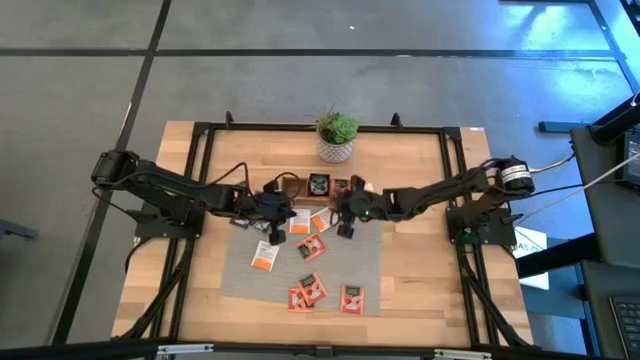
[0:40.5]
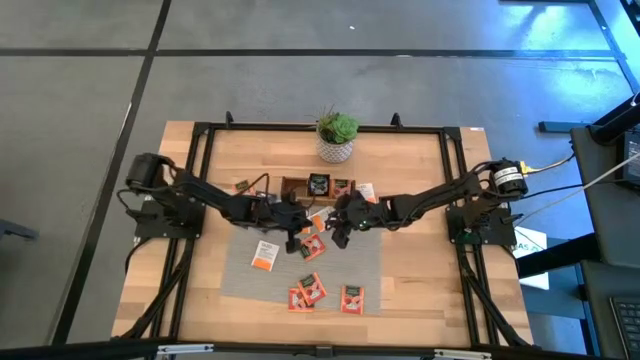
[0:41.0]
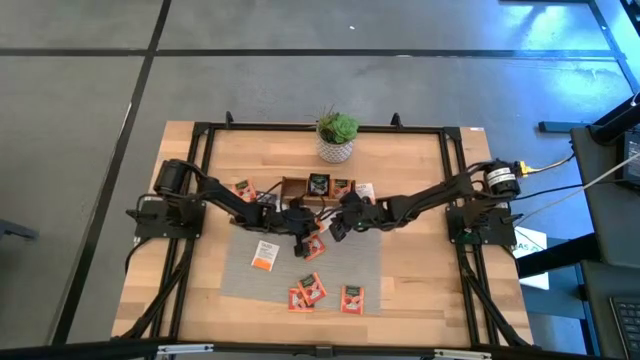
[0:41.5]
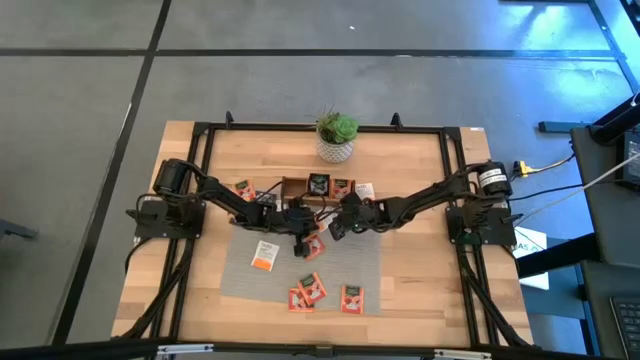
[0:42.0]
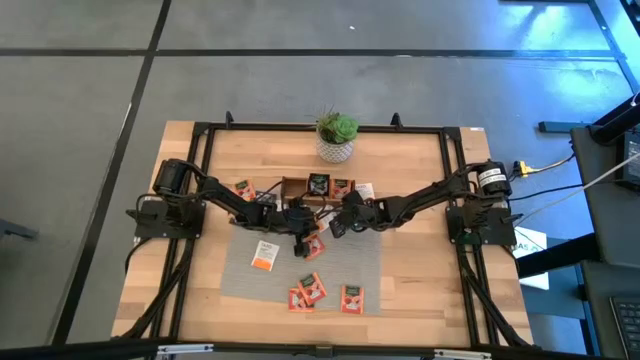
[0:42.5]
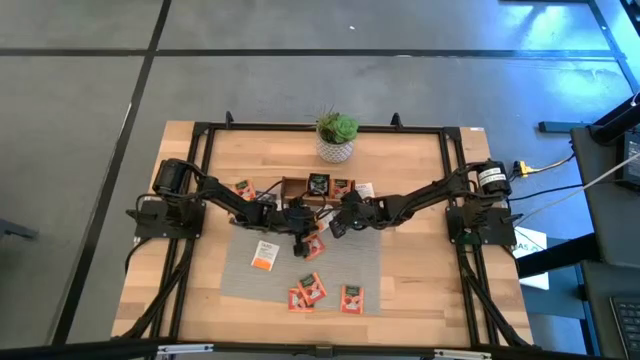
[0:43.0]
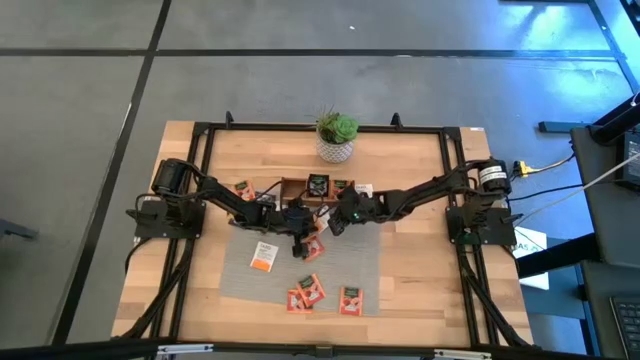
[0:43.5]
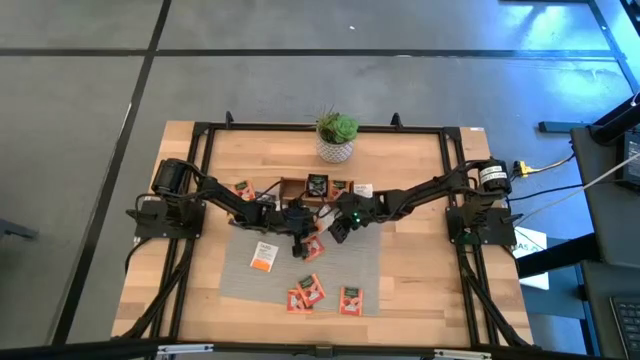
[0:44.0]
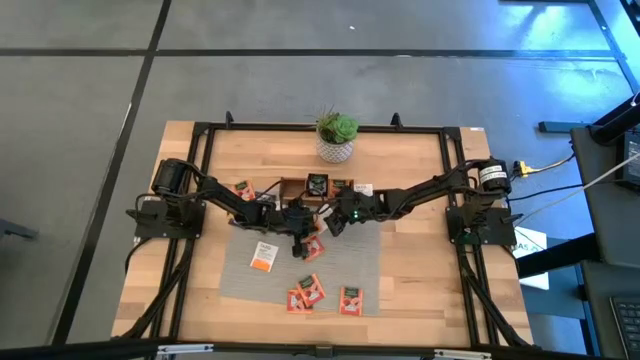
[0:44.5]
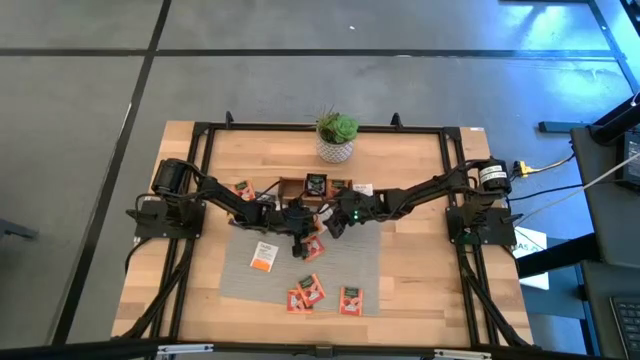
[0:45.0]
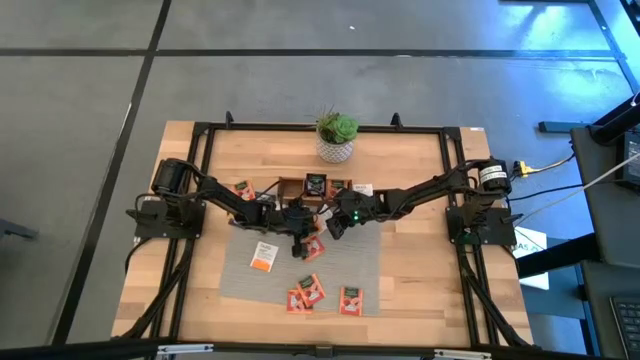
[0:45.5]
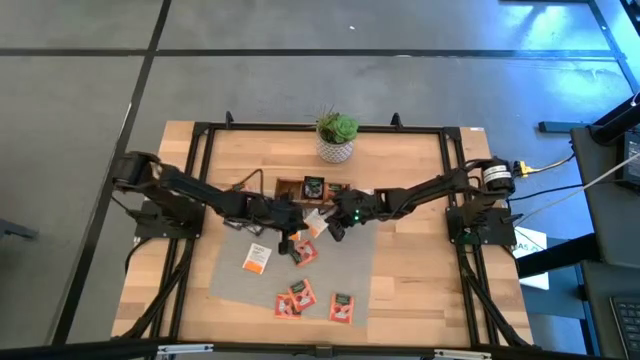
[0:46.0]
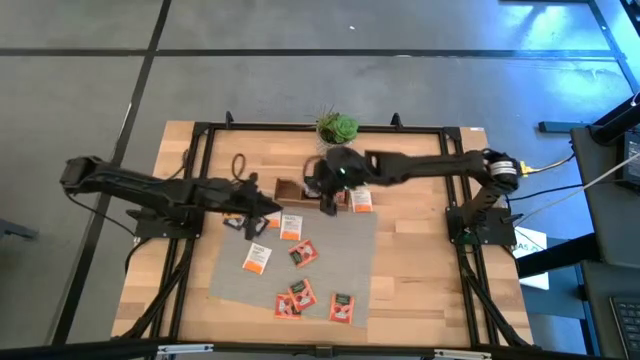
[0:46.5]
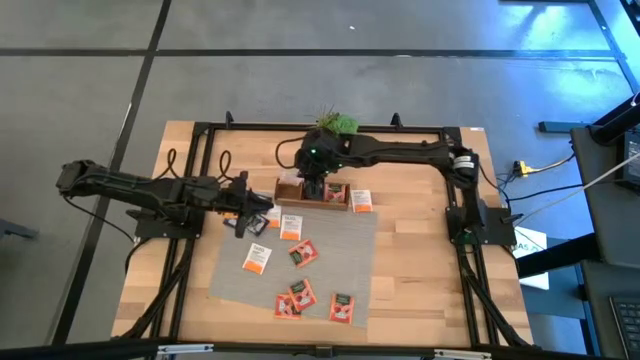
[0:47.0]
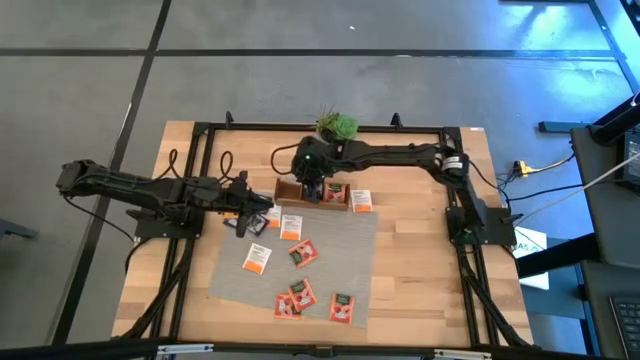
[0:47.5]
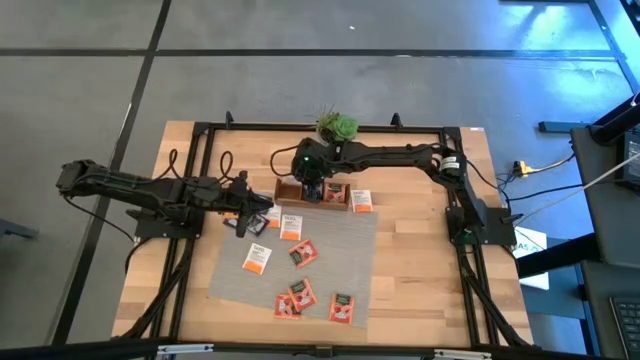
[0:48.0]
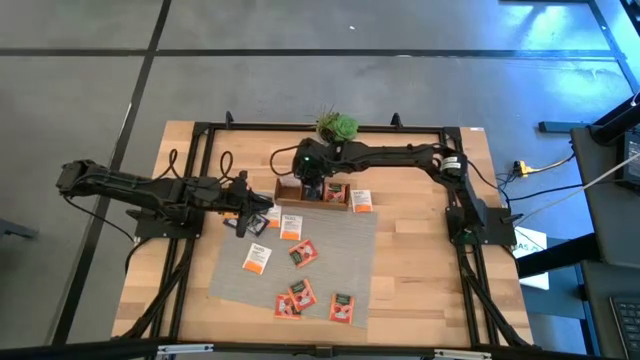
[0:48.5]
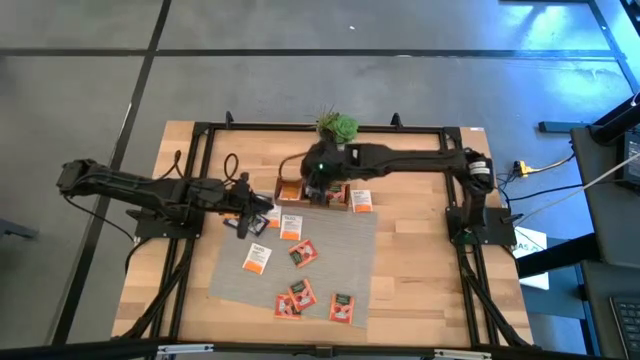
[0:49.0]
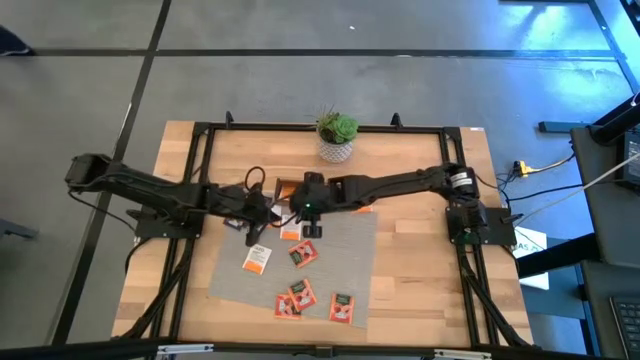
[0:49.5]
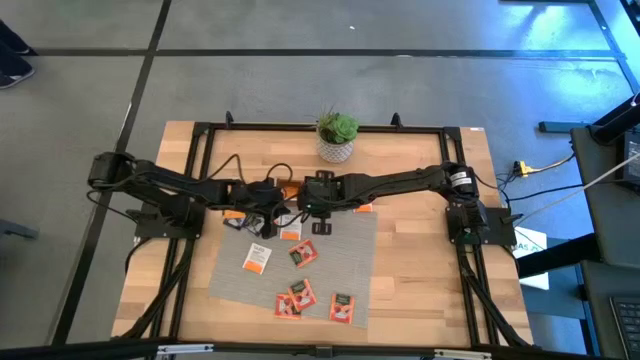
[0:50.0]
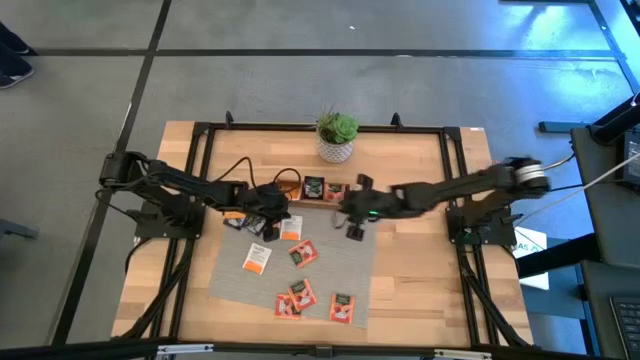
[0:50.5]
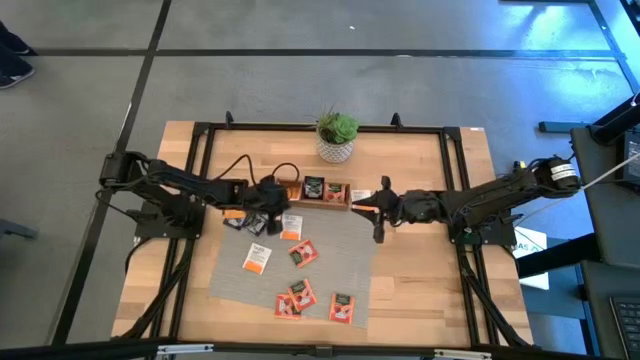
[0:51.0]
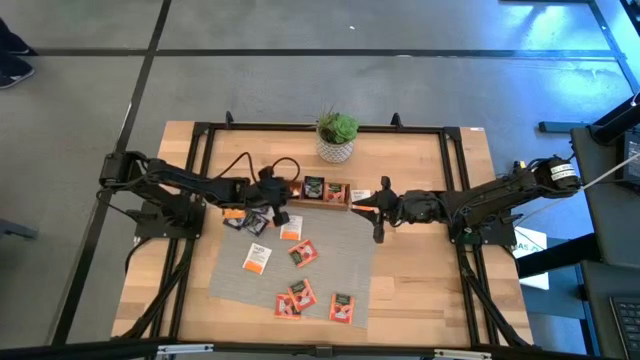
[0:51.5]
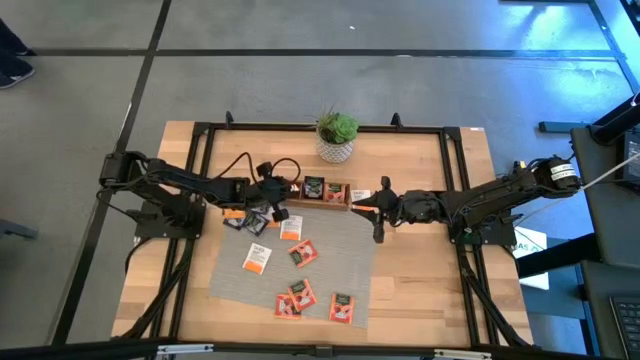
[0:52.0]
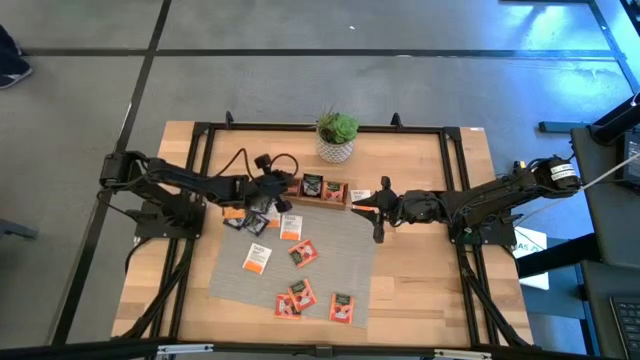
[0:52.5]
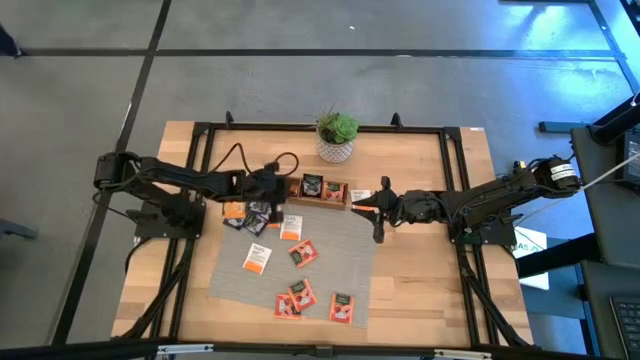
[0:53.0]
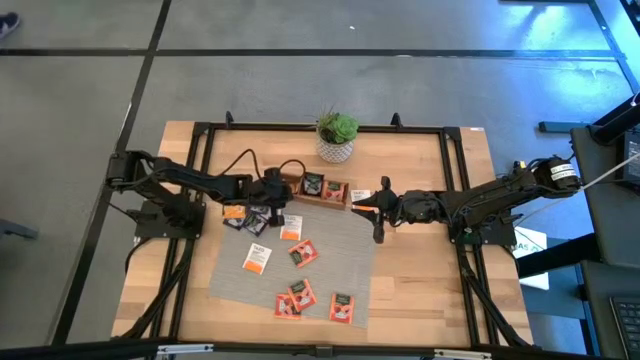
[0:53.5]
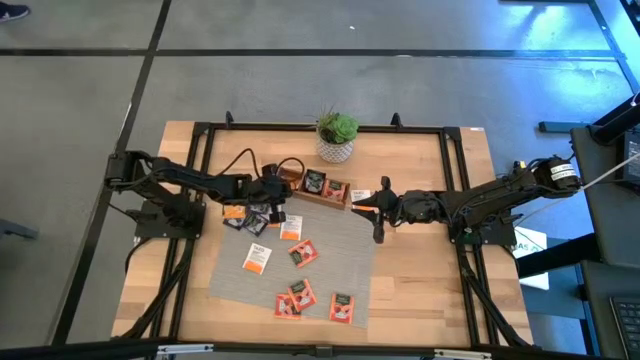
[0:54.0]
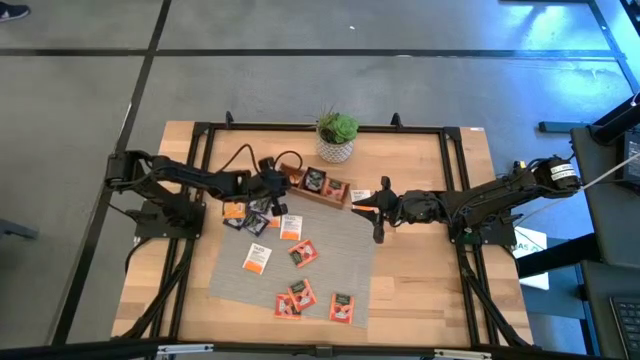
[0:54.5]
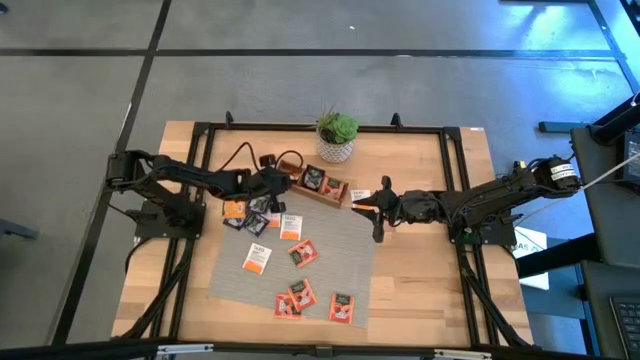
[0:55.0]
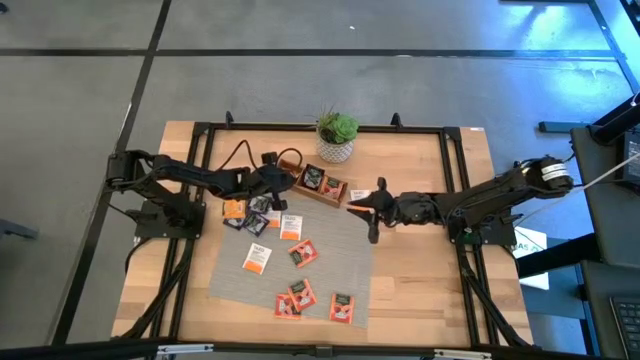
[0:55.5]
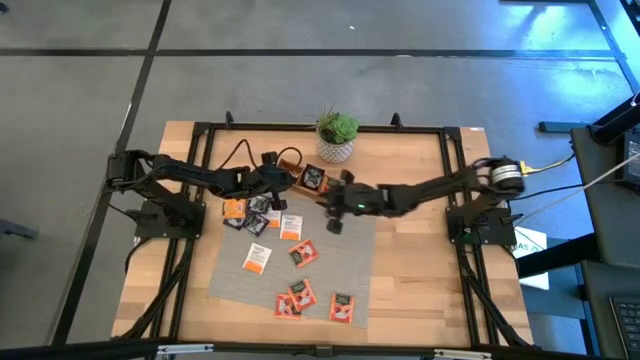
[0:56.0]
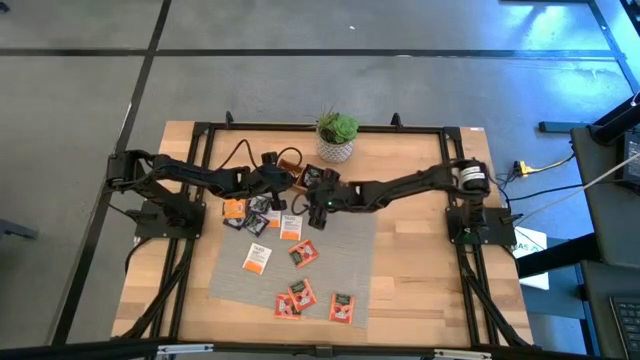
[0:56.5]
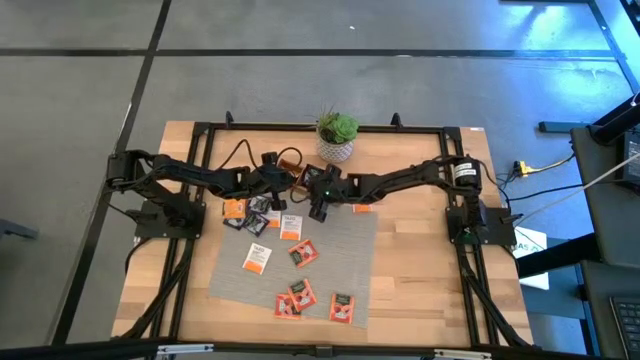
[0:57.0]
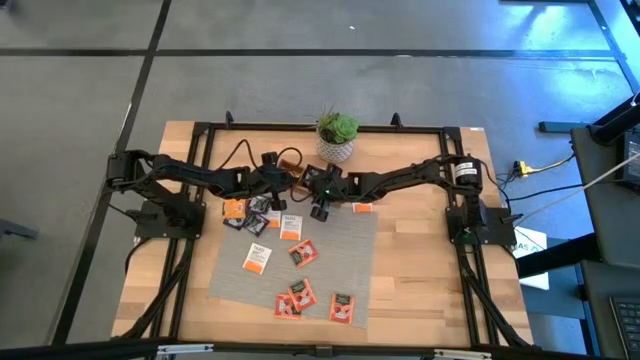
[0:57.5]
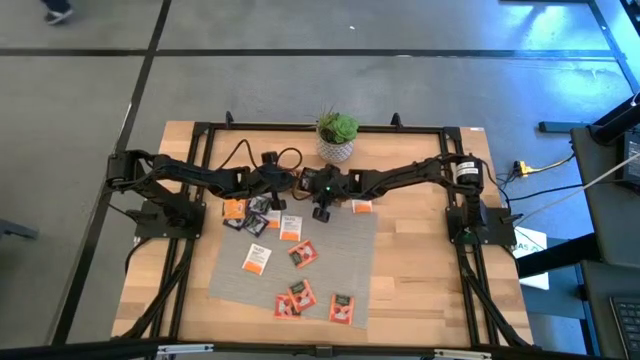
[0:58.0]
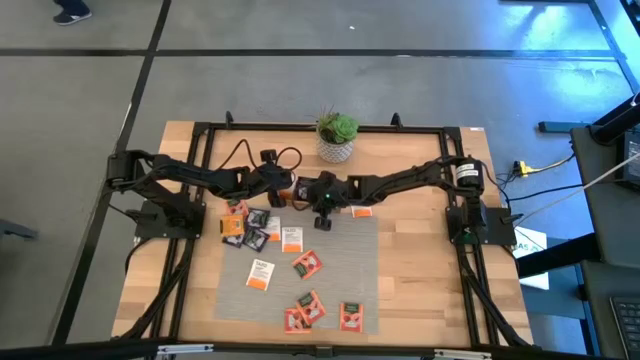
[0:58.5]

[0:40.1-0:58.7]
Task: Pick & Place Tea
Put the white tea bag into the left section of the wooden organizer

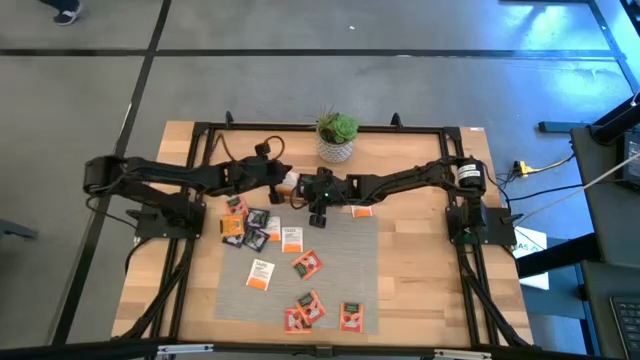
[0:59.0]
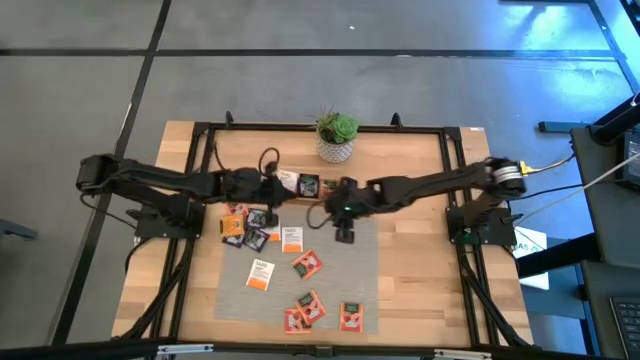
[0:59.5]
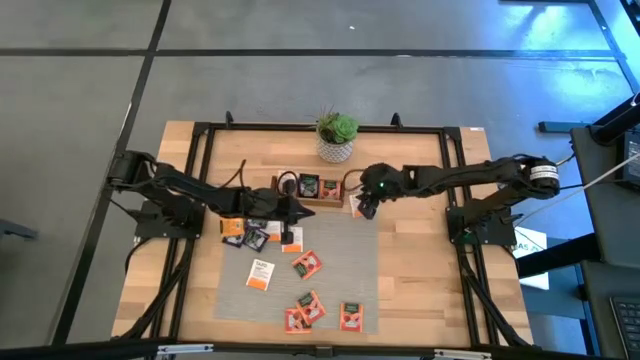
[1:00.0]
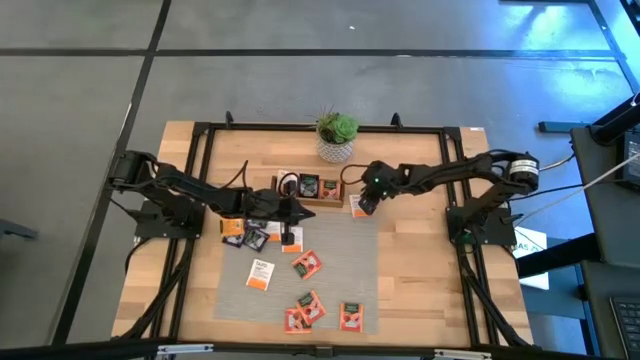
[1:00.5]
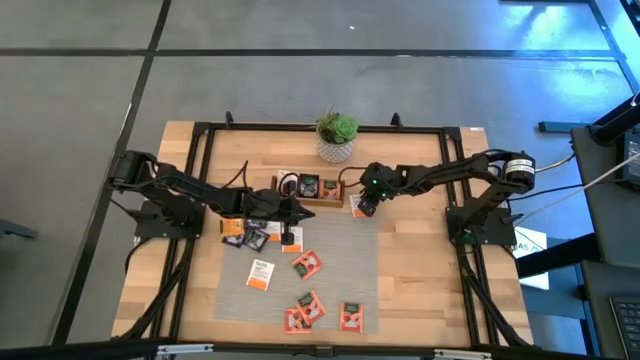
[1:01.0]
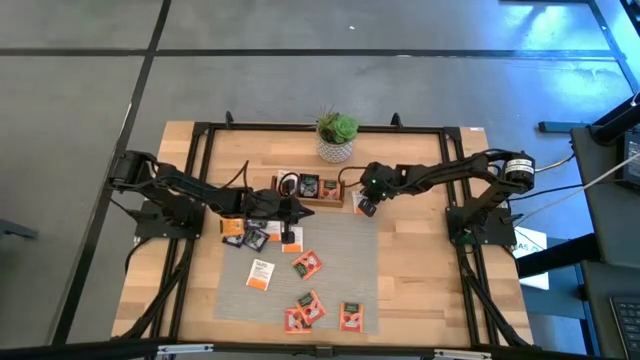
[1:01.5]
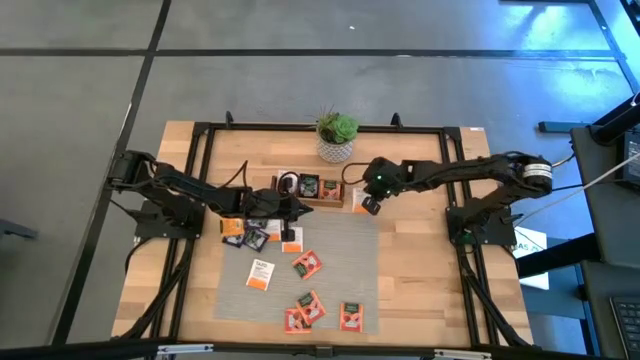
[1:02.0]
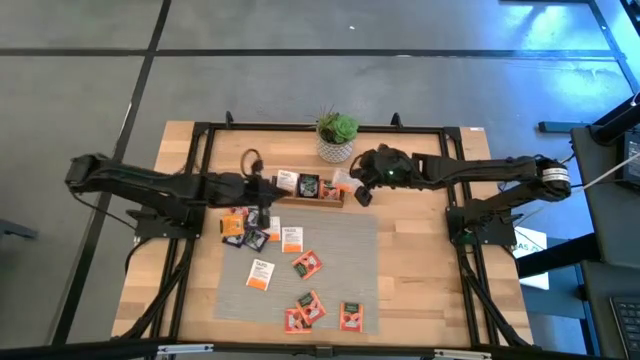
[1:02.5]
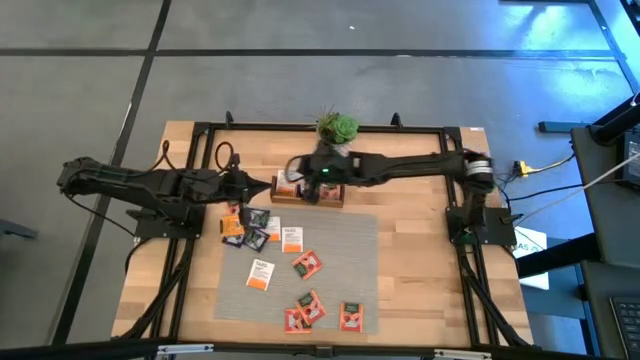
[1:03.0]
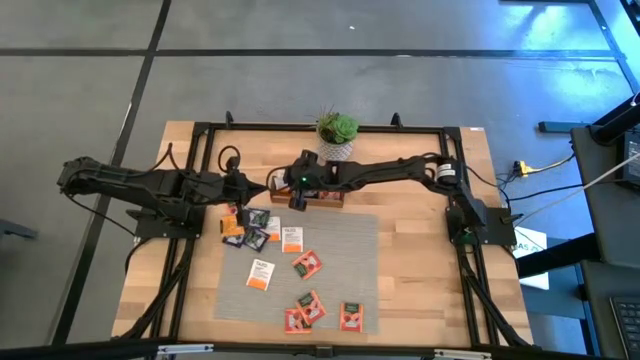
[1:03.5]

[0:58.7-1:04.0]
Put the white tea bag into the left section of the wooden organizer
